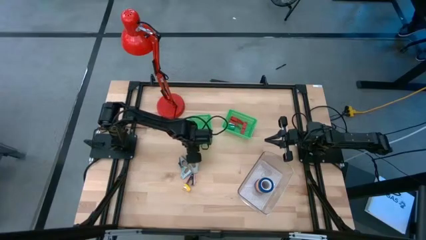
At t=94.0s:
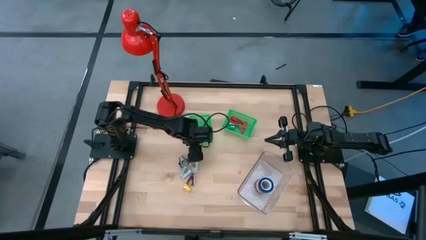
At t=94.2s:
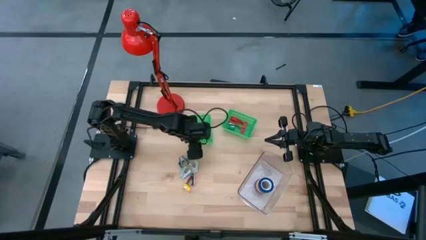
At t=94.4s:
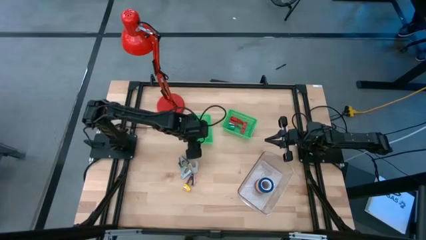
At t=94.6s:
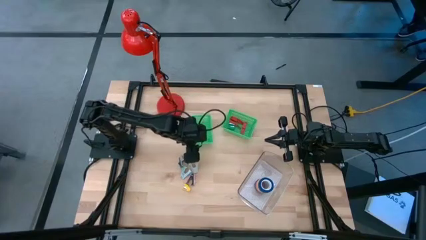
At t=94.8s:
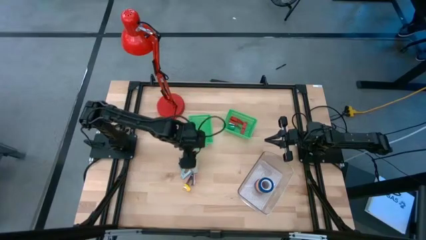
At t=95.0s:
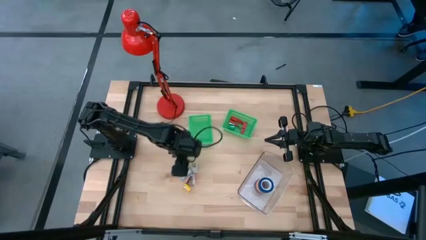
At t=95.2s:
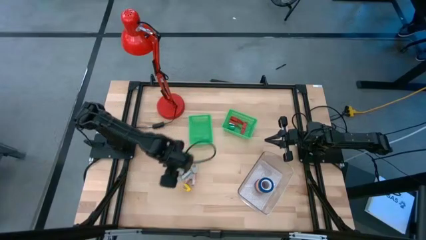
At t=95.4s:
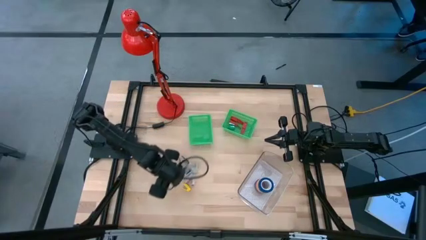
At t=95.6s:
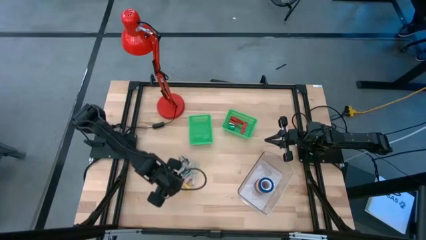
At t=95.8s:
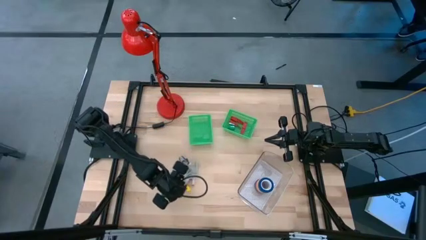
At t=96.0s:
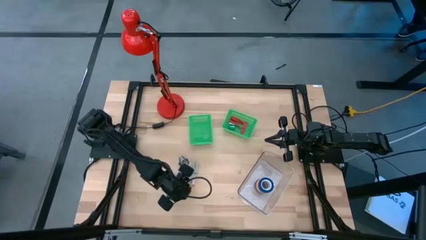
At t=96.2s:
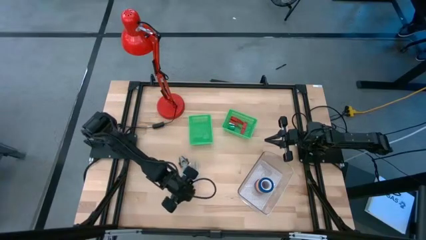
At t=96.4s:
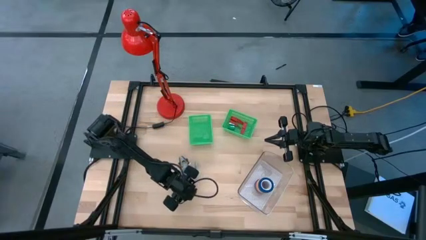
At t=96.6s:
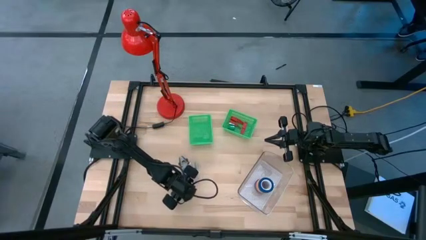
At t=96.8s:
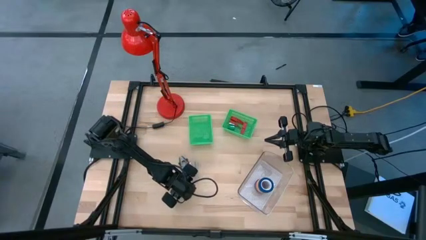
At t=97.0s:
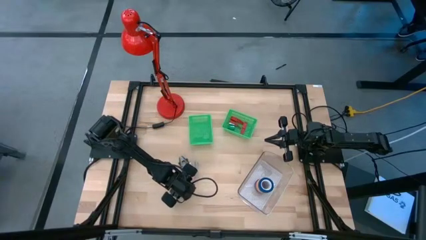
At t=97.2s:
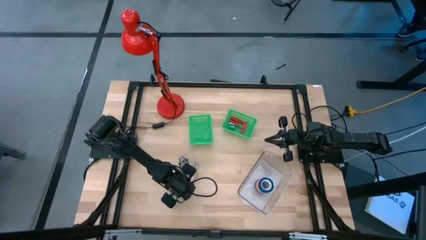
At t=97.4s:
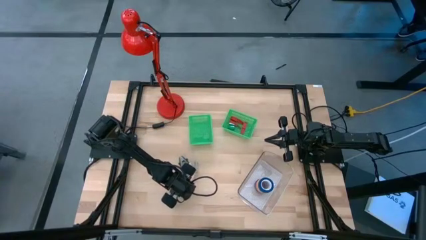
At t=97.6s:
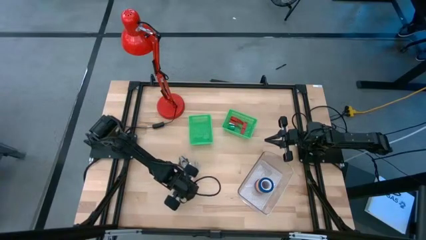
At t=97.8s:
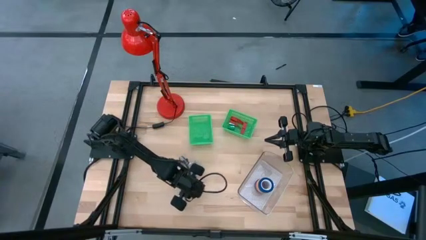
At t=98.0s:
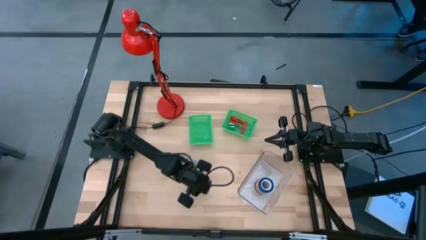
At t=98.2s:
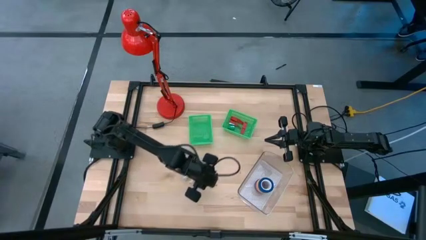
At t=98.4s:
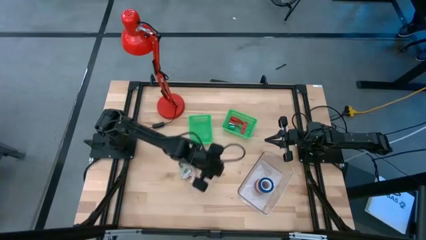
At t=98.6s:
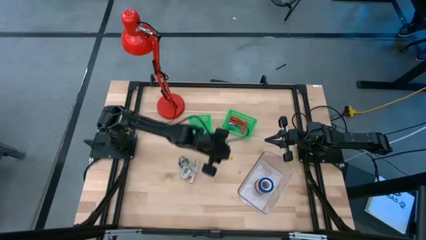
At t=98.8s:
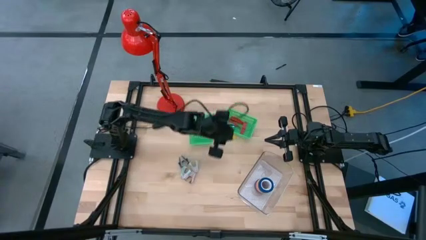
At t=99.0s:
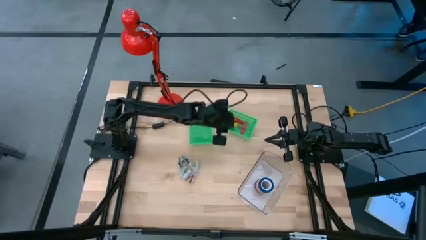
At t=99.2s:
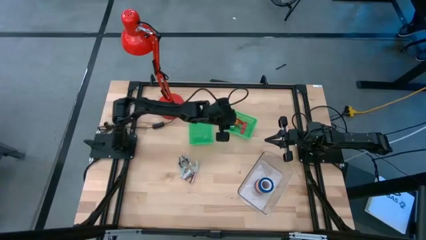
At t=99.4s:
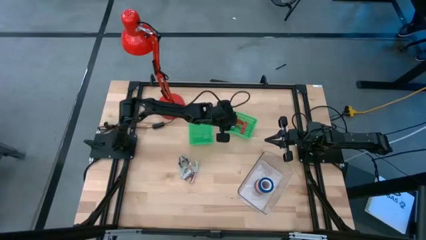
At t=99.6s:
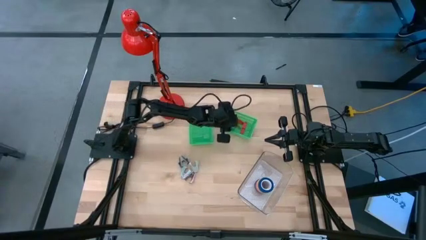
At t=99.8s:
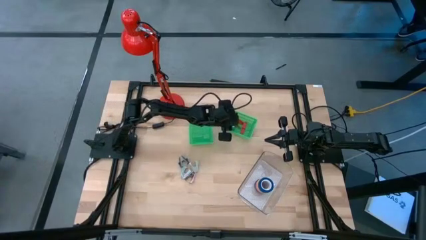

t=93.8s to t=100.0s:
Task: Pick and place Stapler, Stapler remover, tape
Put the yellow stapler into the right green bin

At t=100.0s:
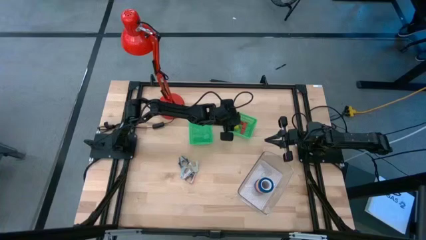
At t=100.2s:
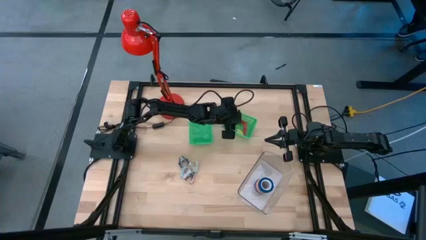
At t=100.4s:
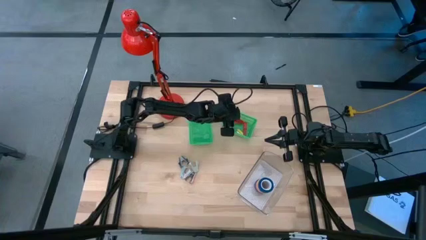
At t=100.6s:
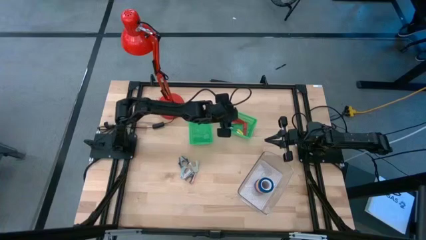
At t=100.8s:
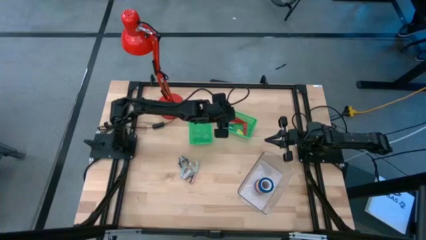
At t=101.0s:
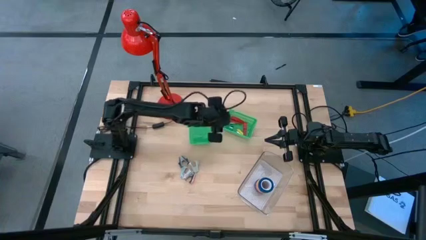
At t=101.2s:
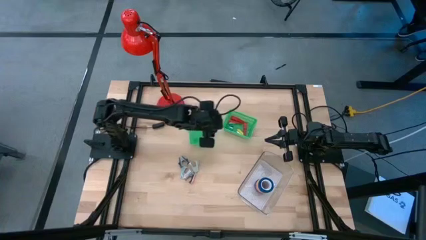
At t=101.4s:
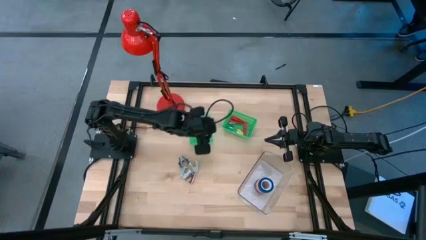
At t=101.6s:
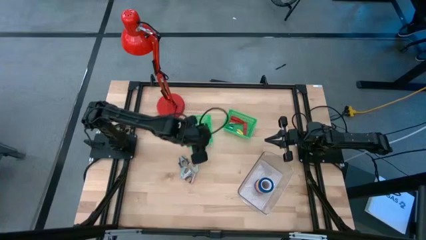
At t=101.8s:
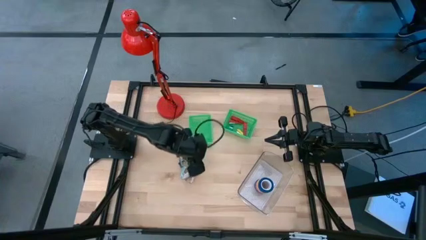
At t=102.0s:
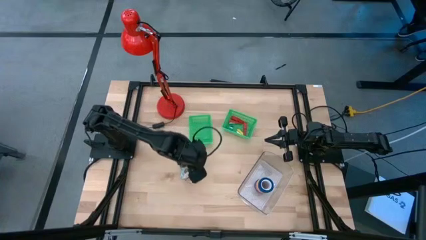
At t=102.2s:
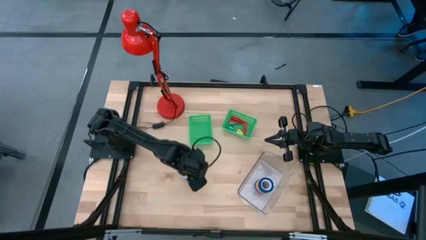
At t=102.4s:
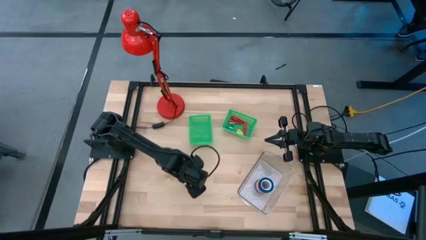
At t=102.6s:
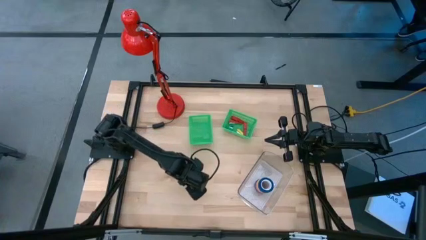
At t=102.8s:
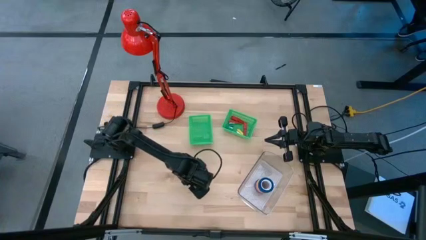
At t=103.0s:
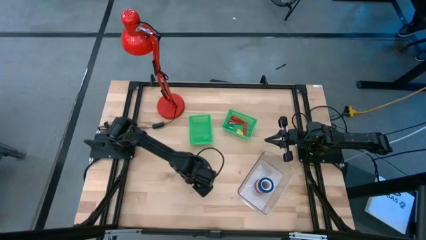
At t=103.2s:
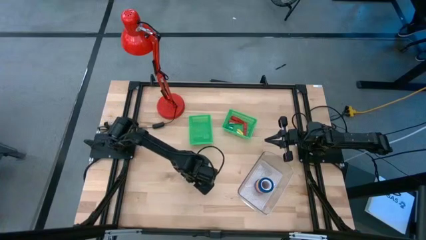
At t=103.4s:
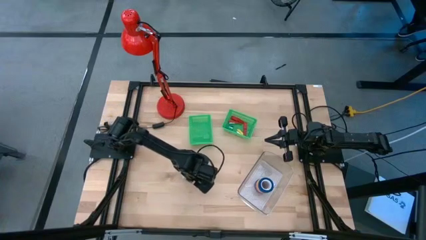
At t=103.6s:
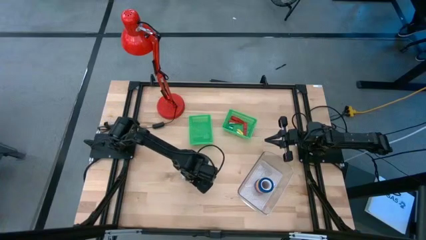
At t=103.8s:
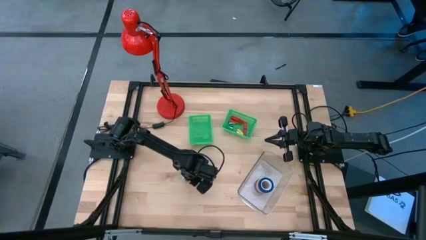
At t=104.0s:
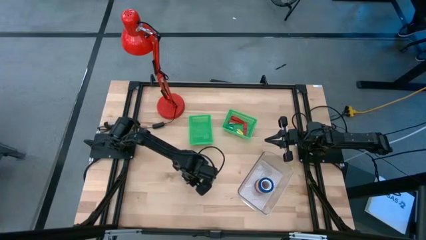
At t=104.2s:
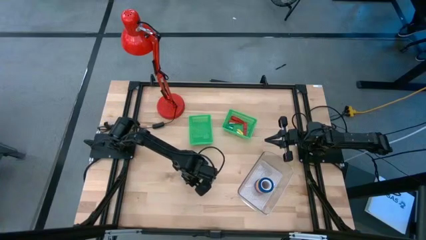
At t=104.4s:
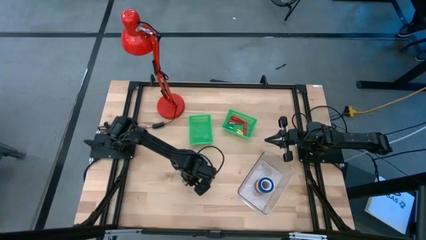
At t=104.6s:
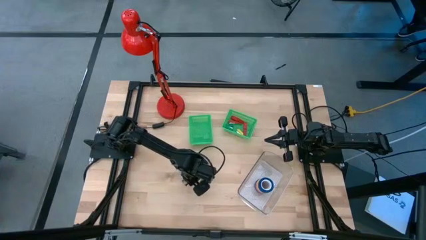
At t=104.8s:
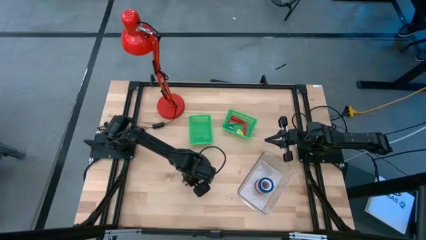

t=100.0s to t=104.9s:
Put the pink staple remover into the left green bin

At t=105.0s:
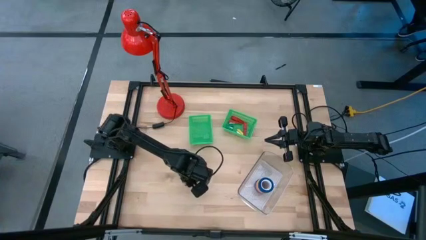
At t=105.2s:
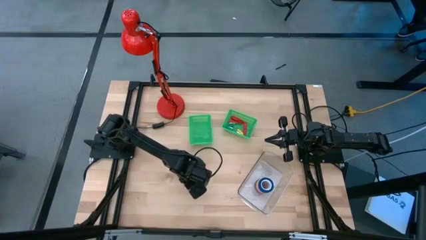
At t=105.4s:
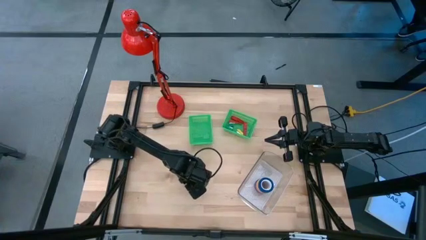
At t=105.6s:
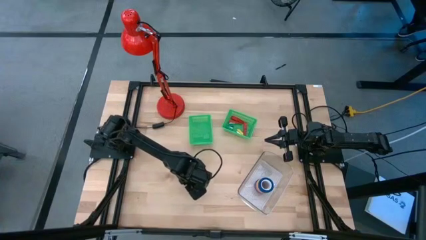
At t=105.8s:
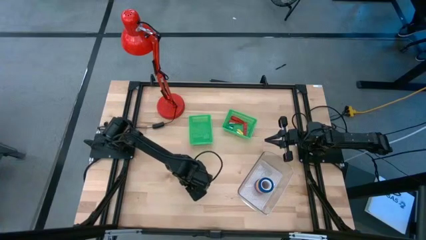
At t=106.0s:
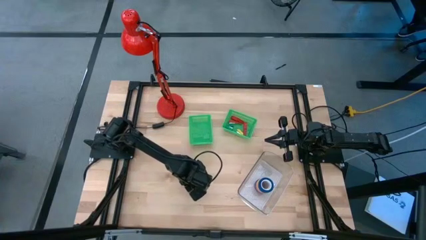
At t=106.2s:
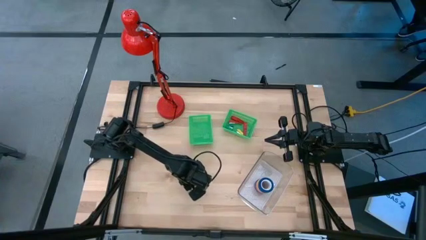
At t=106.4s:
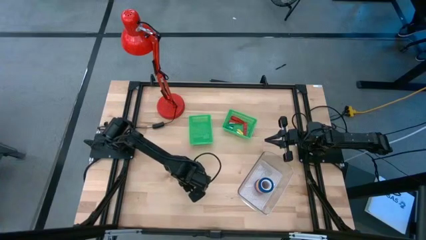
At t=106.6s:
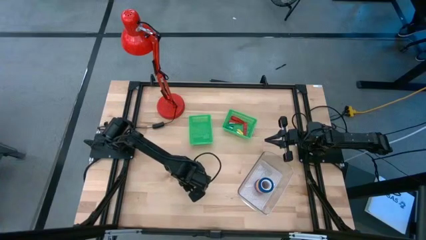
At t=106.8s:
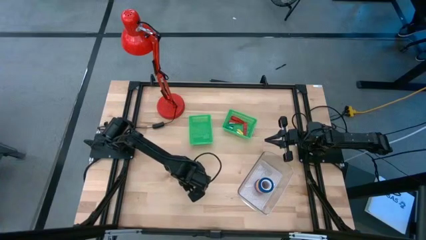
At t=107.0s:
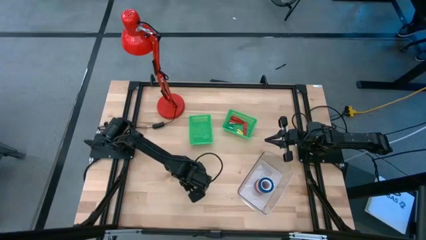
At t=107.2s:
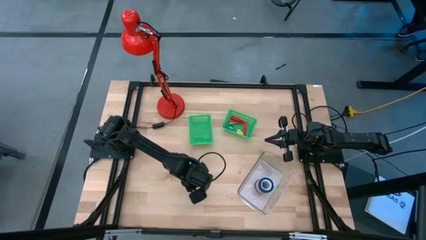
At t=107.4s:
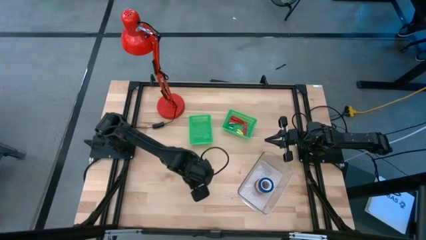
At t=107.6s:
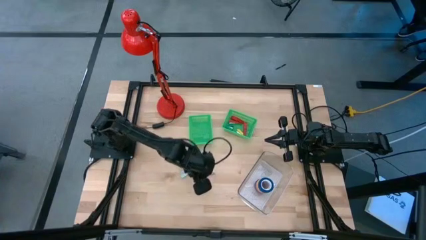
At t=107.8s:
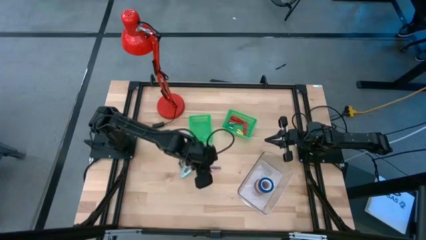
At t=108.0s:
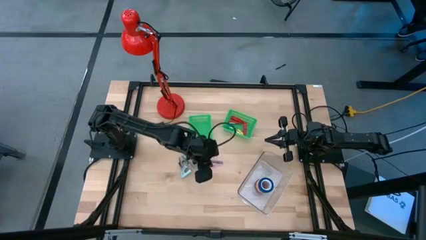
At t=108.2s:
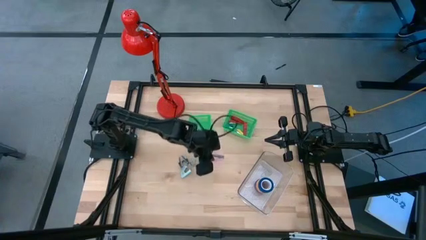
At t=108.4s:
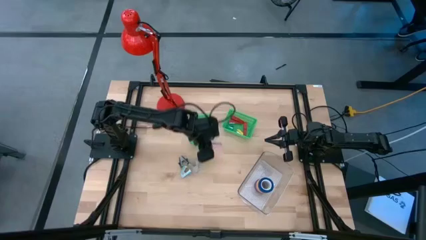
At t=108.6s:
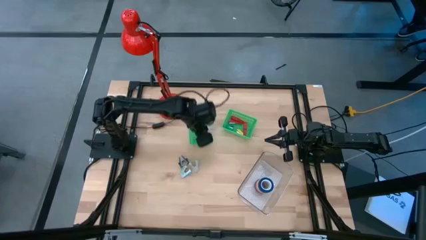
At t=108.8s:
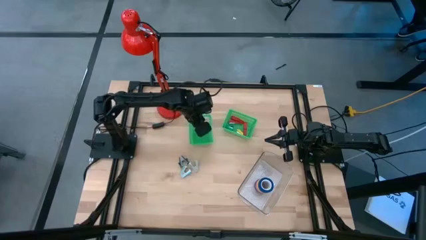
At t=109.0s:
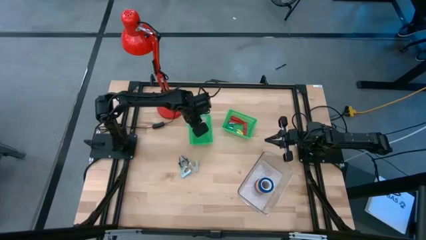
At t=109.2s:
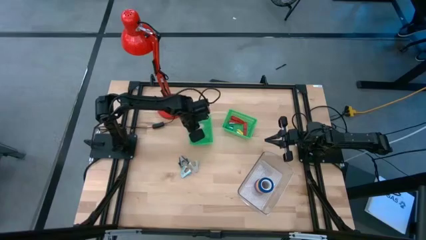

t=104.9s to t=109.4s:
Put the pink staple remover into the left green bin
